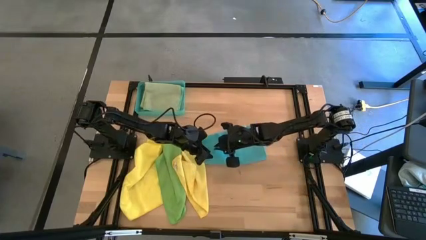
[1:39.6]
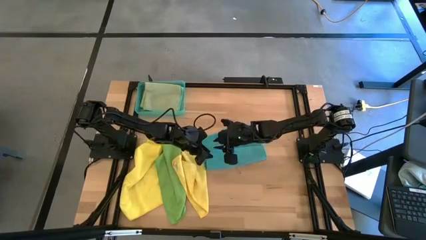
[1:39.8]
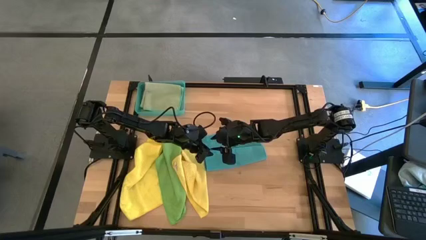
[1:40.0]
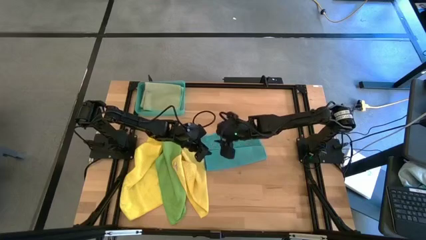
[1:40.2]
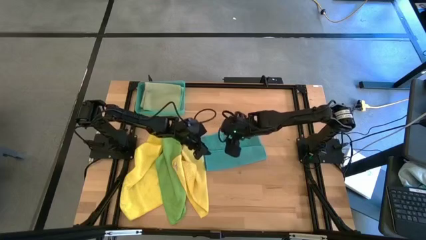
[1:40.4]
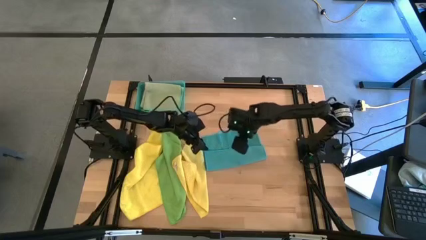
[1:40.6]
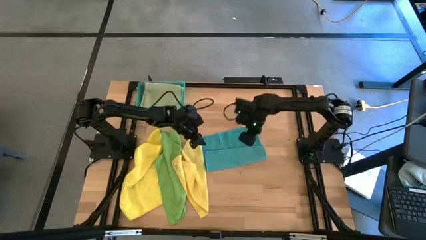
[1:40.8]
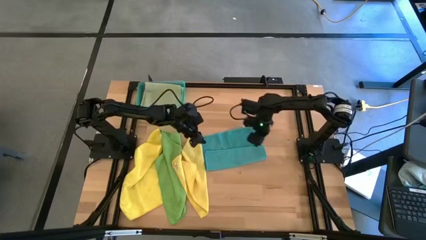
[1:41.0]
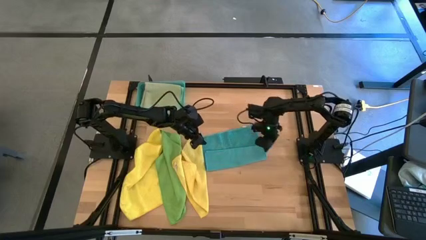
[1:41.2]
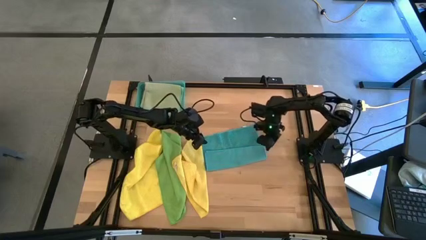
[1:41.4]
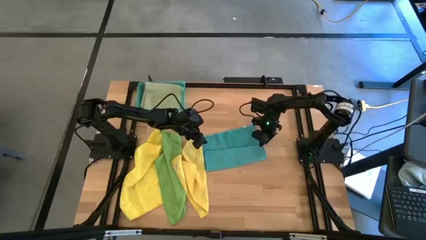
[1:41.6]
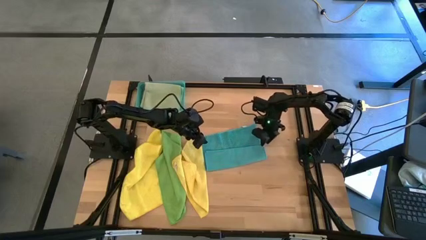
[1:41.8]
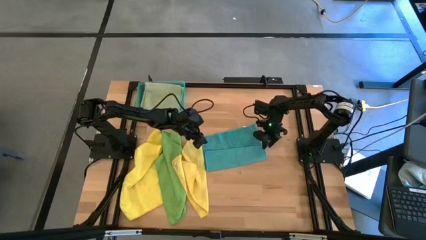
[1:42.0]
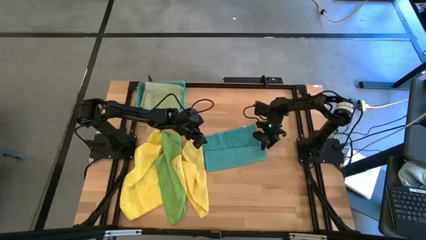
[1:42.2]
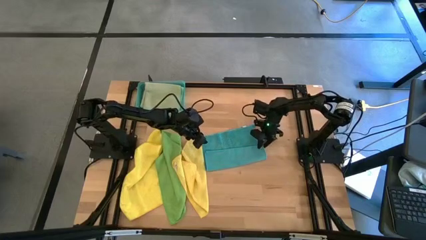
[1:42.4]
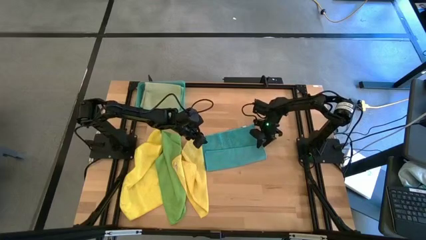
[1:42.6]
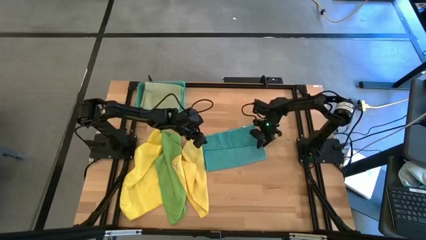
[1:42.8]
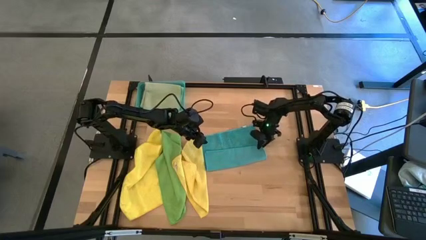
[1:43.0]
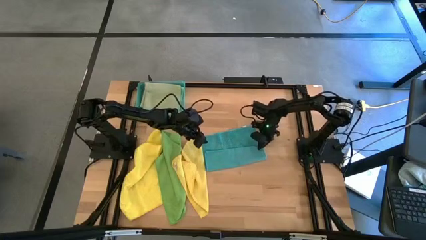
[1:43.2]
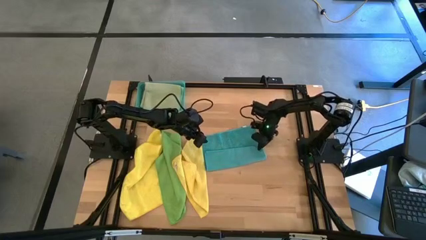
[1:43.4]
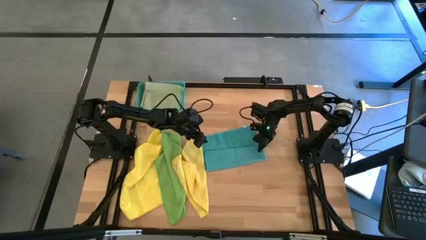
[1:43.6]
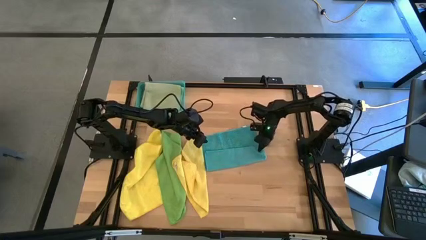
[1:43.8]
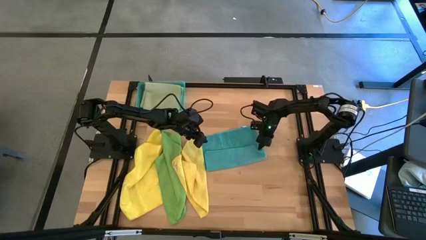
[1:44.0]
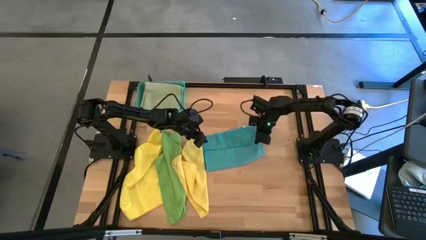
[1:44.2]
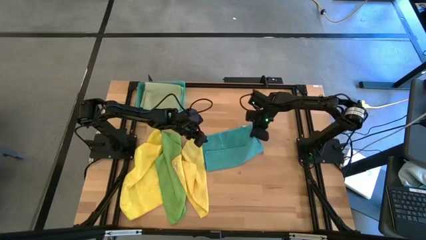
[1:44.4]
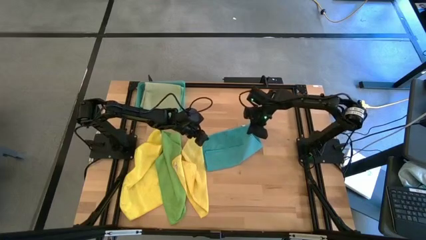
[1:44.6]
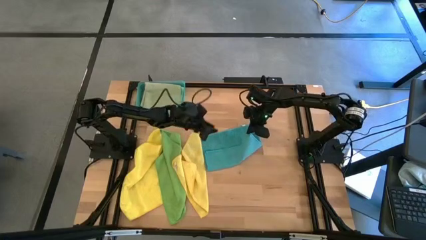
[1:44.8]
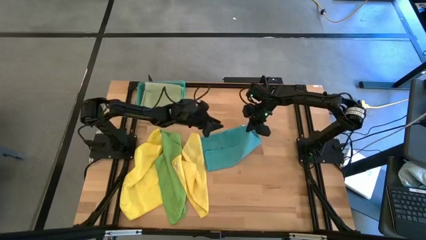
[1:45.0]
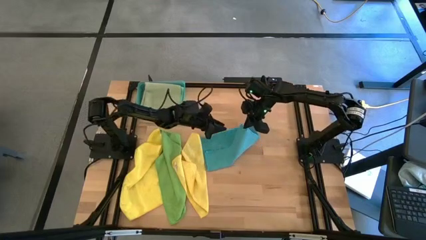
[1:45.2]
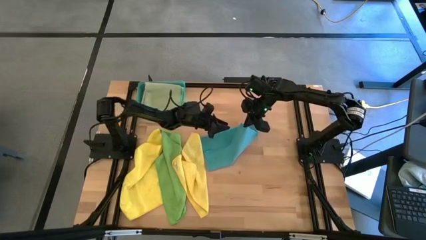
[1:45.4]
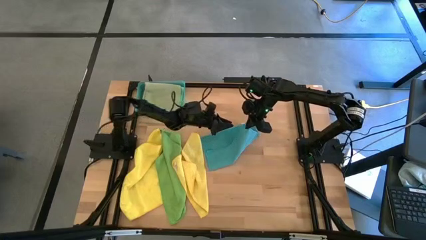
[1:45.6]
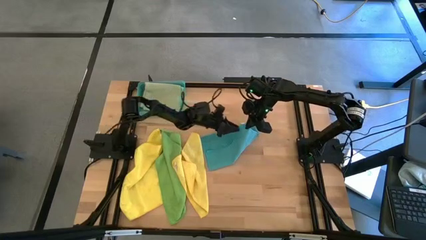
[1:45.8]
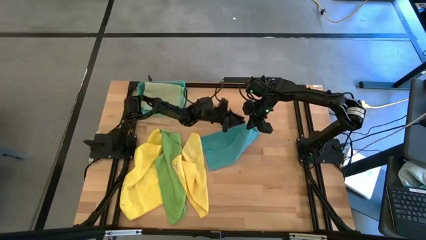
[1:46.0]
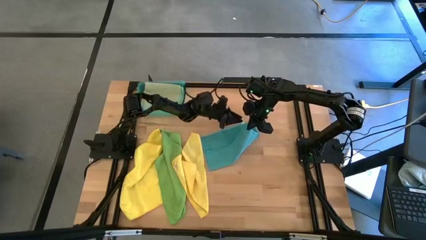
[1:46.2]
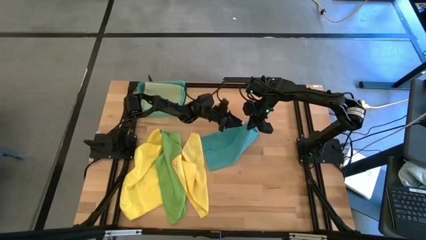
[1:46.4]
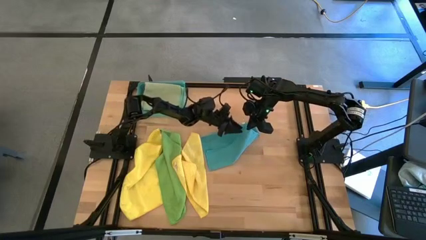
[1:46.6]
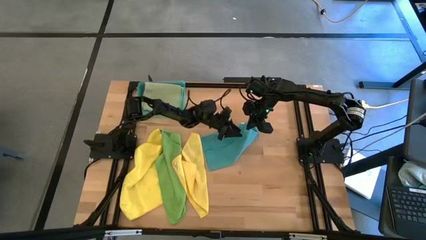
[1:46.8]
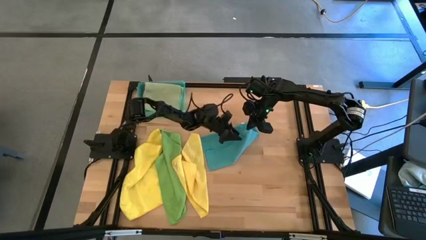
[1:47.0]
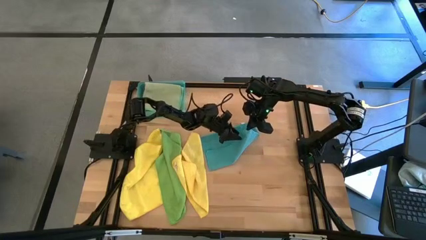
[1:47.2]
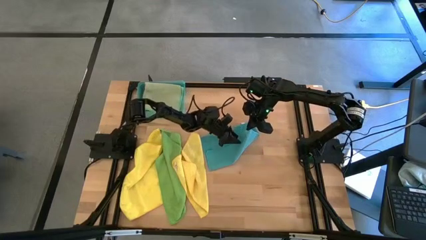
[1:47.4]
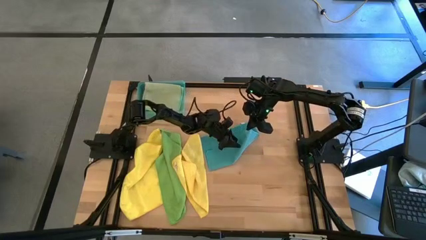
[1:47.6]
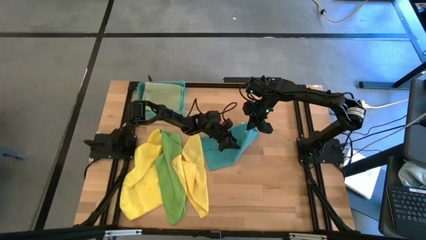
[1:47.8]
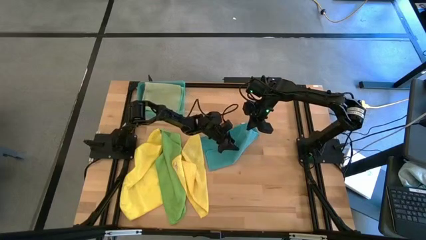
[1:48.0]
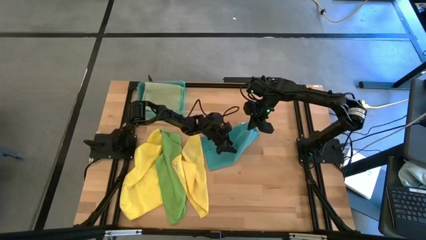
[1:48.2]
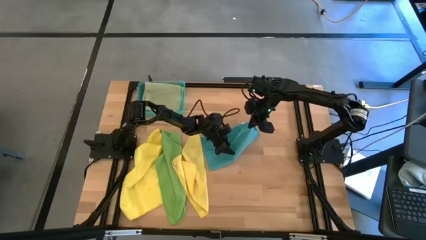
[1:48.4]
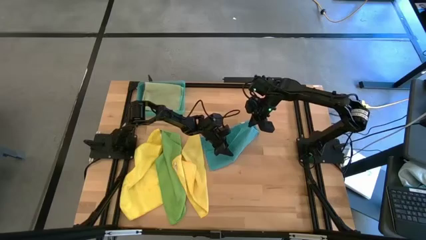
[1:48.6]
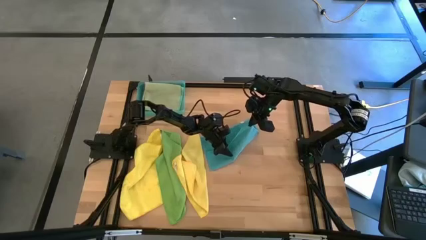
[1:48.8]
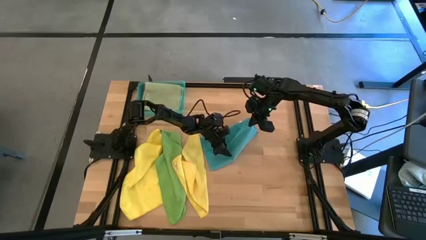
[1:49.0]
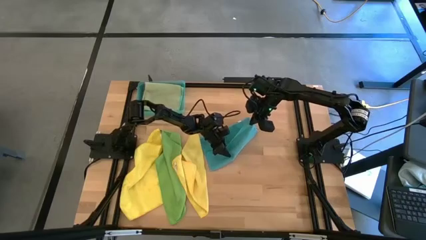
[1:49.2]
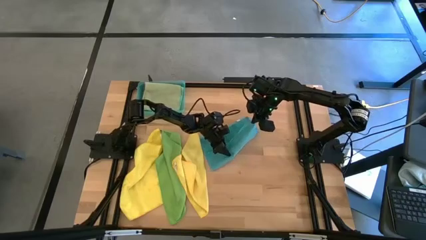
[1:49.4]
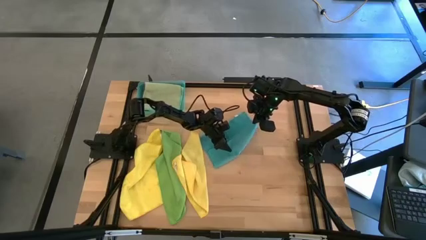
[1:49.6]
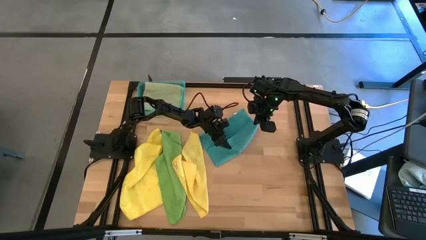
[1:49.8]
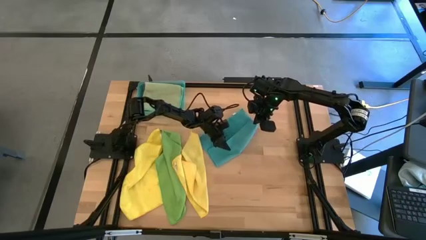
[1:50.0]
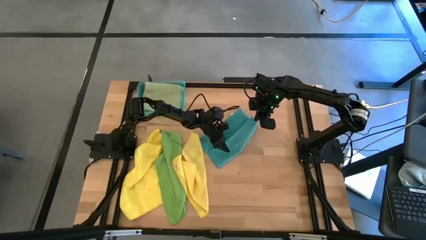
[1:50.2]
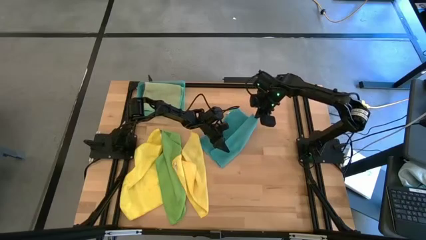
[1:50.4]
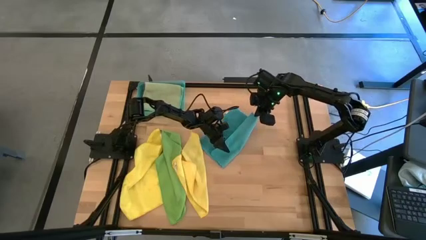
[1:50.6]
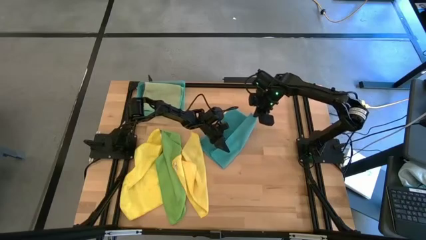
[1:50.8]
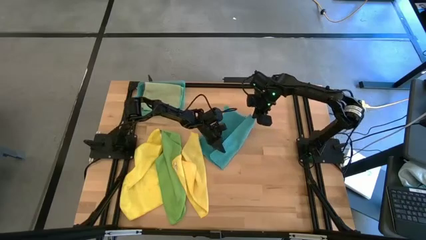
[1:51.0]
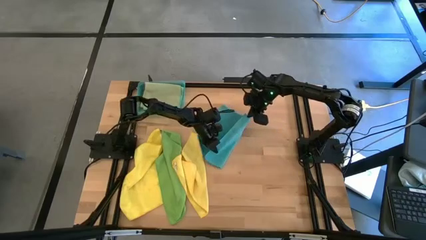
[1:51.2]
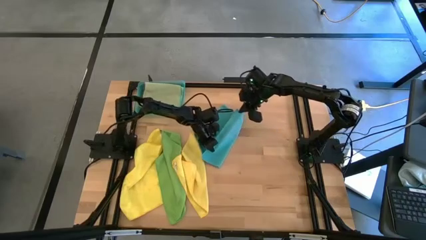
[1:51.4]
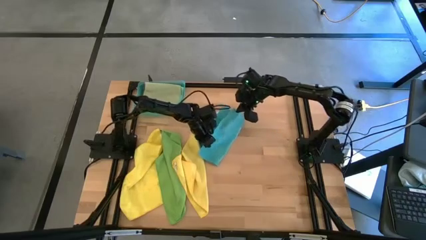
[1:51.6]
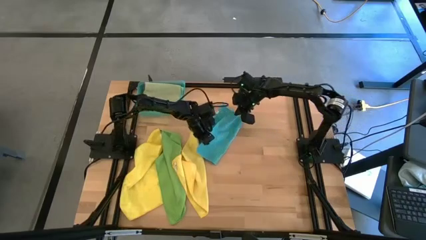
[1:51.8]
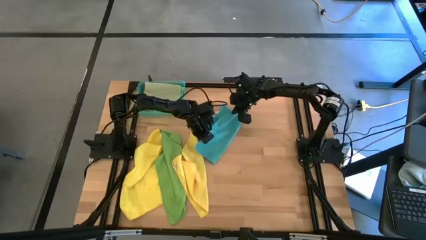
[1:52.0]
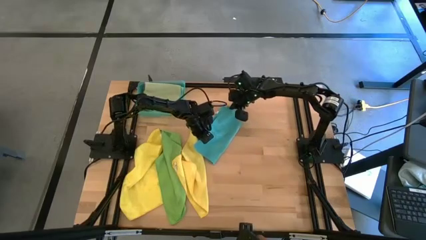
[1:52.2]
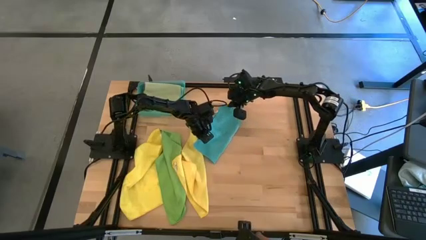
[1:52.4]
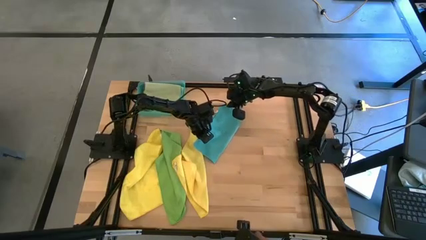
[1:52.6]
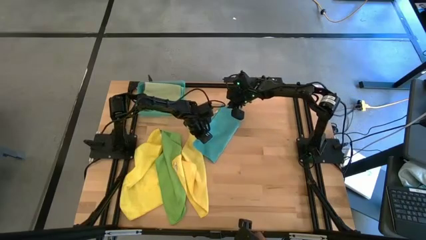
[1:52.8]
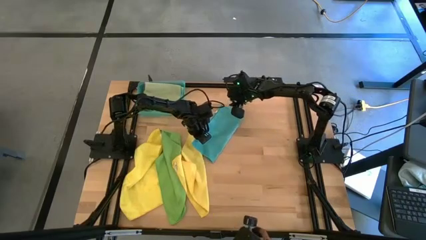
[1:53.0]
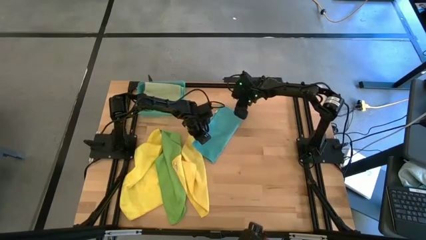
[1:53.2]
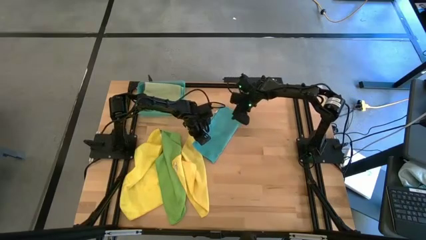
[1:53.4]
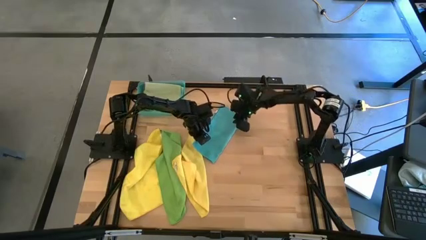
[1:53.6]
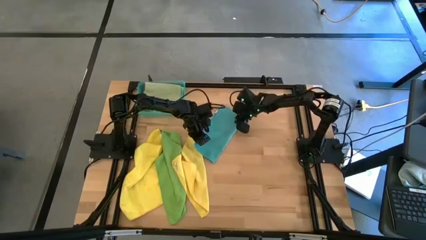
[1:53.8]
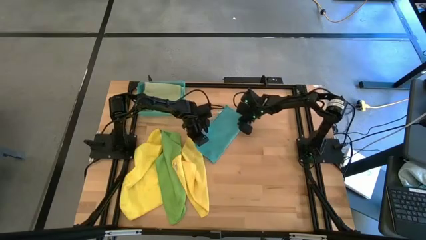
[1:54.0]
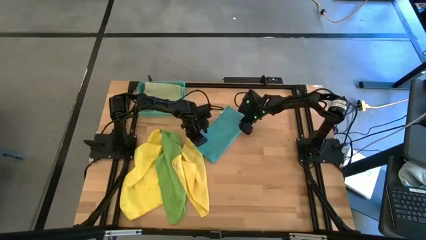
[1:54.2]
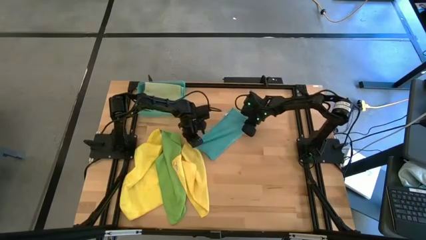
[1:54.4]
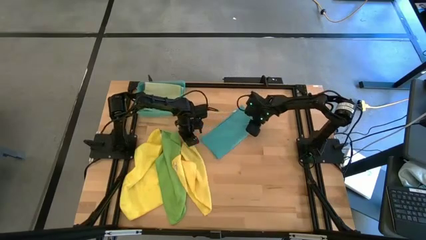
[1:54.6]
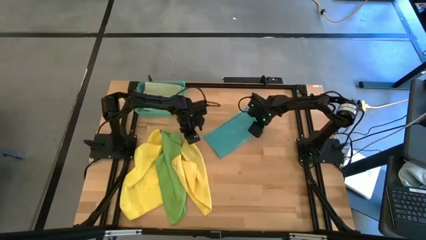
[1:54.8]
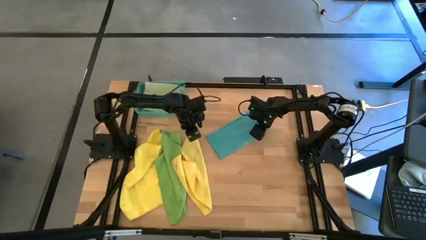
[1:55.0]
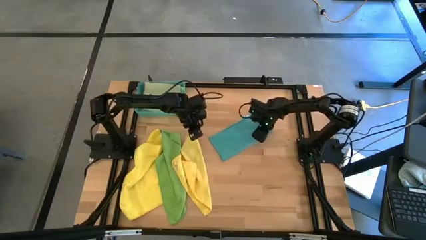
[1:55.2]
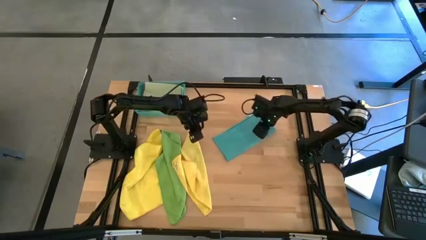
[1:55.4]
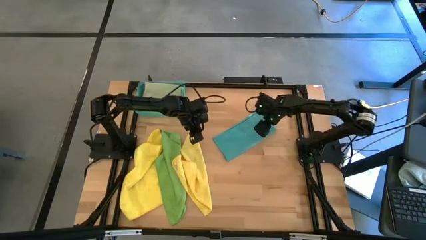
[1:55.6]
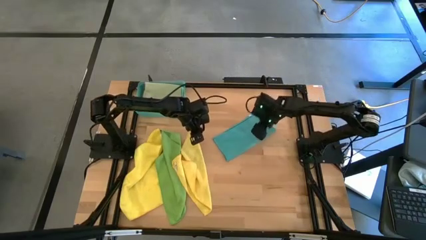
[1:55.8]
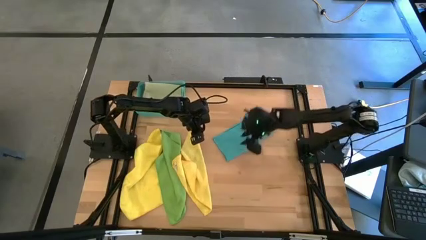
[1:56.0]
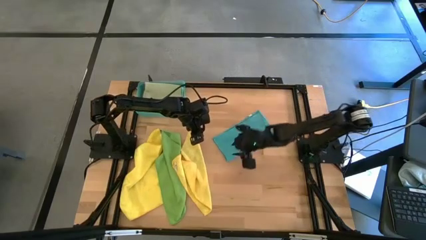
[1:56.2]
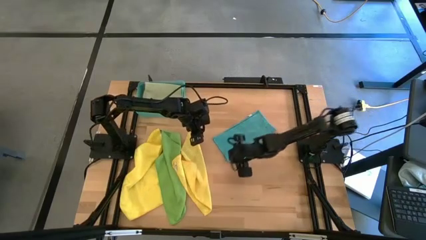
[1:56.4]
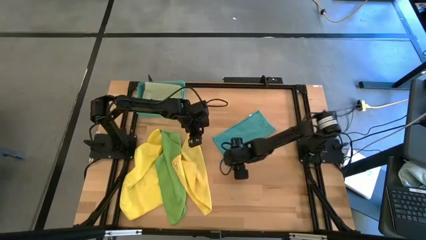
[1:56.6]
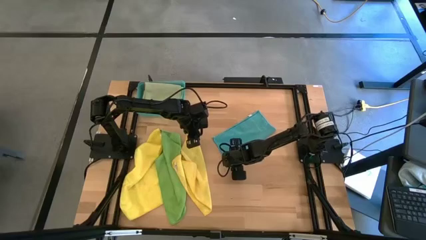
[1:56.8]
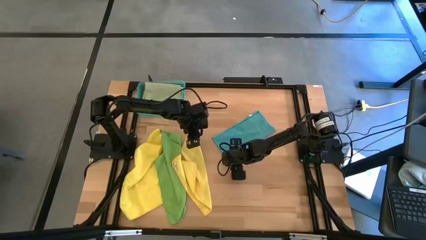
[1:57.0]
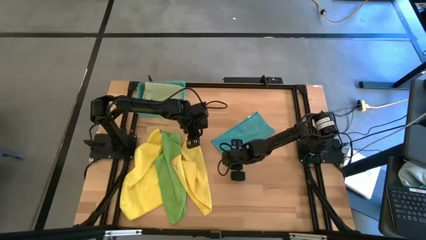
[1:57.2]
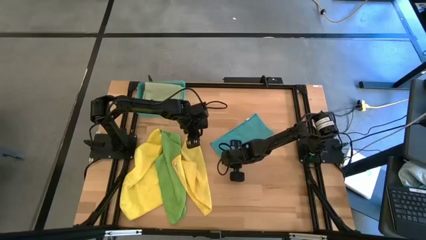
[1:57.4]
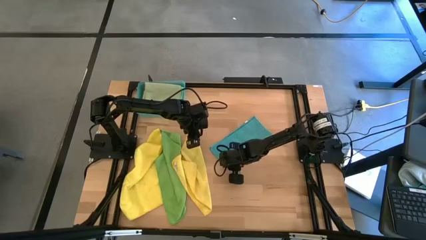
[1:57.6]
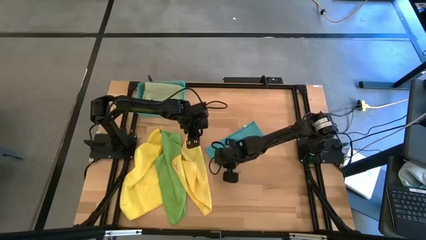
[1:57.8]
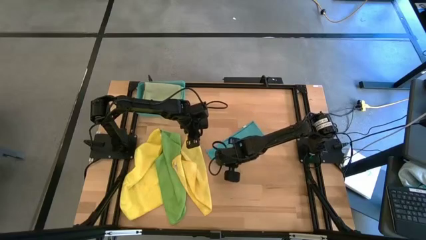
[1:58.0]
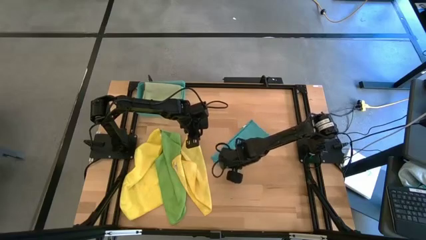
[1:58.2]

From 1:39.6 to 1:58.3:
Task: Fold microfiber towels
Fold the blue microfiber cloth
